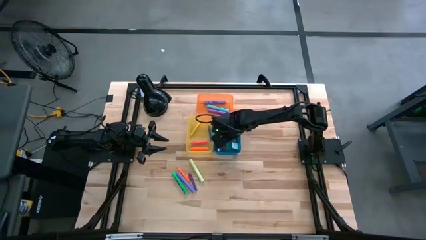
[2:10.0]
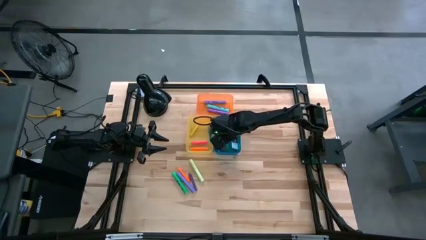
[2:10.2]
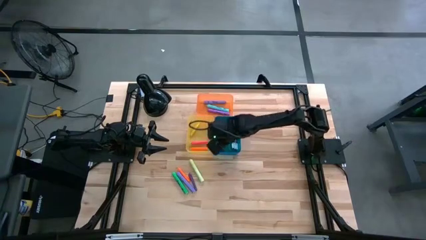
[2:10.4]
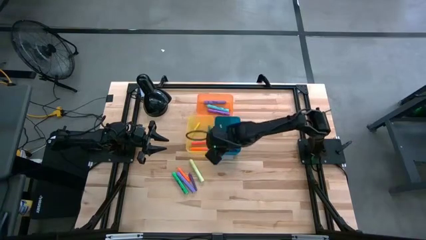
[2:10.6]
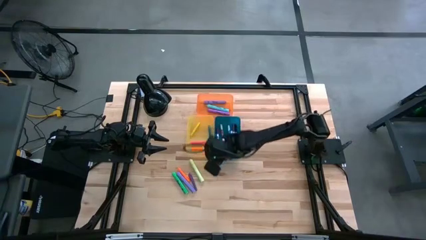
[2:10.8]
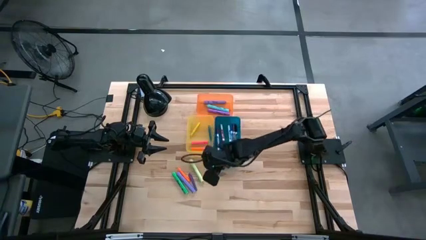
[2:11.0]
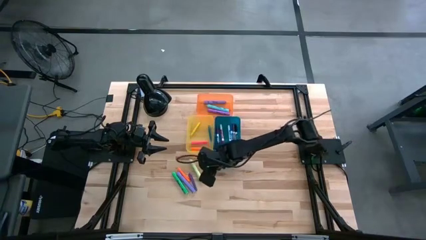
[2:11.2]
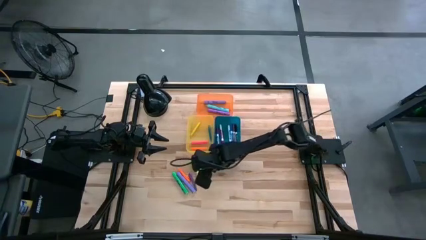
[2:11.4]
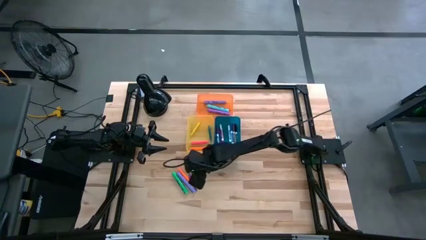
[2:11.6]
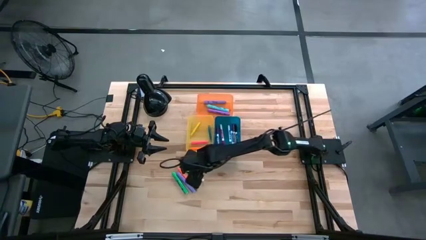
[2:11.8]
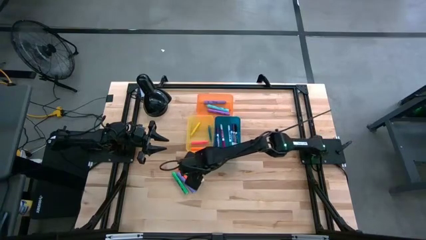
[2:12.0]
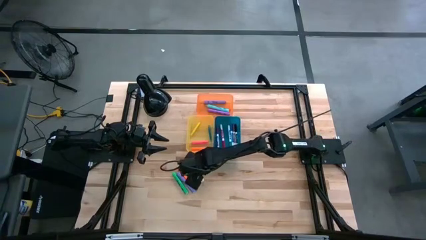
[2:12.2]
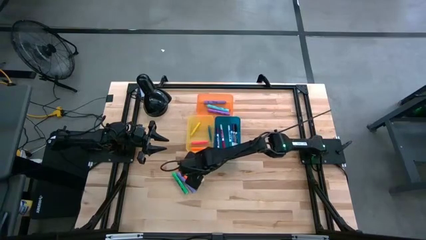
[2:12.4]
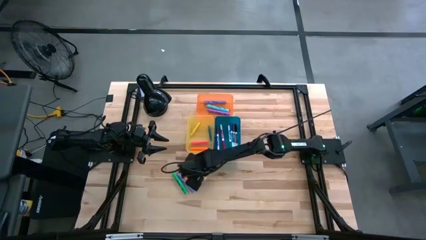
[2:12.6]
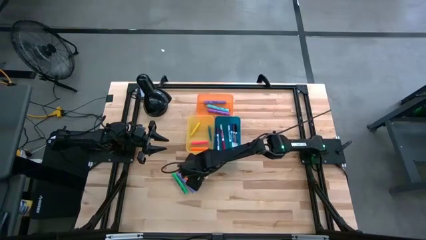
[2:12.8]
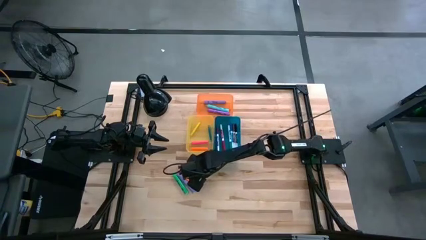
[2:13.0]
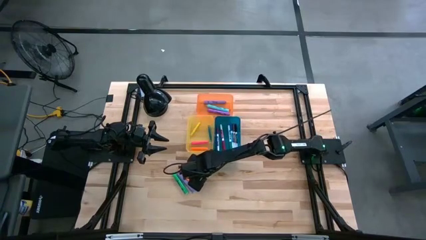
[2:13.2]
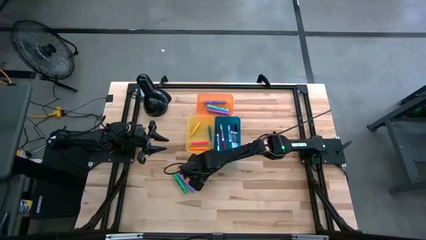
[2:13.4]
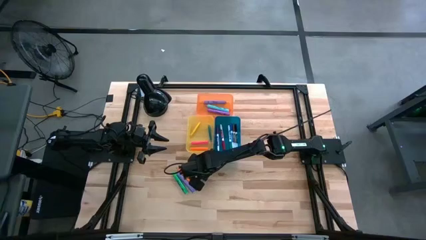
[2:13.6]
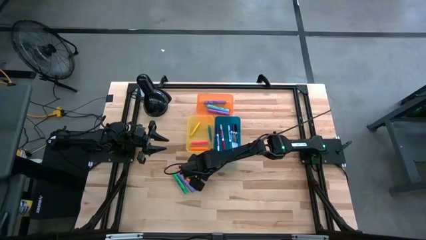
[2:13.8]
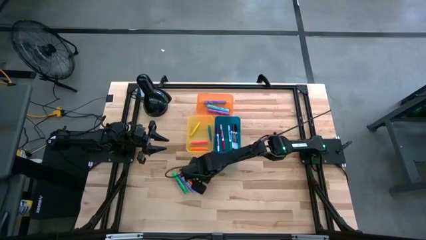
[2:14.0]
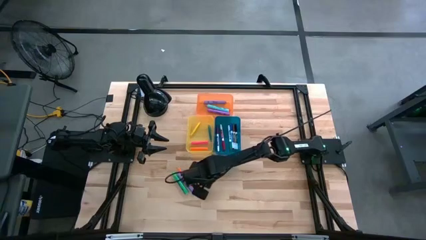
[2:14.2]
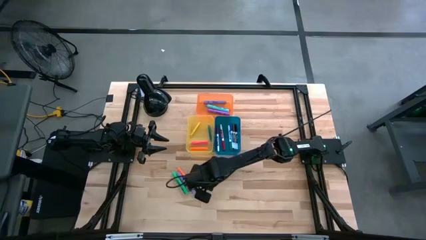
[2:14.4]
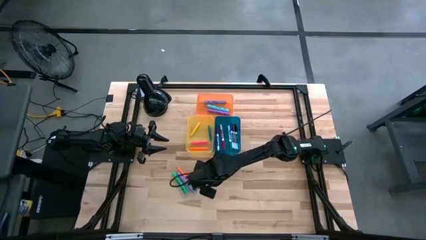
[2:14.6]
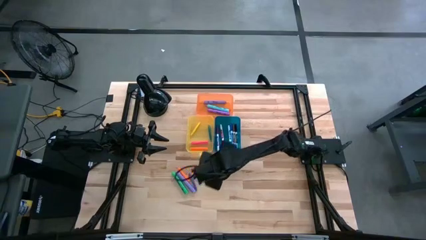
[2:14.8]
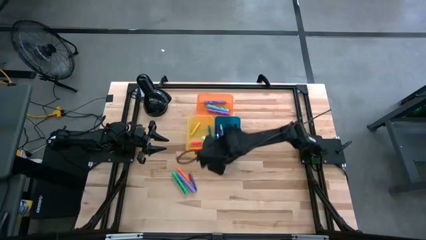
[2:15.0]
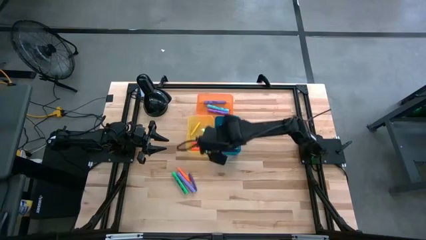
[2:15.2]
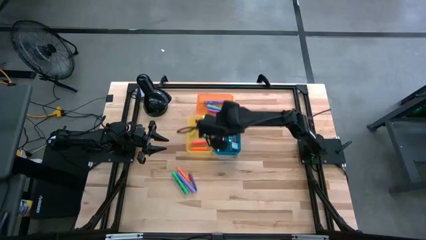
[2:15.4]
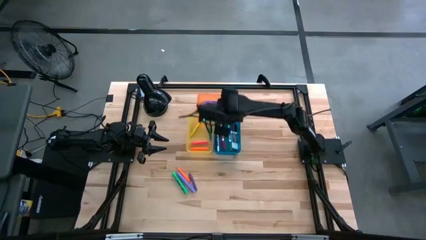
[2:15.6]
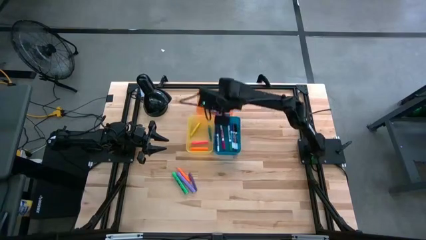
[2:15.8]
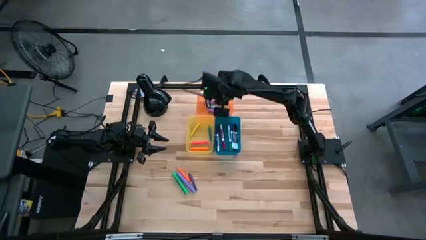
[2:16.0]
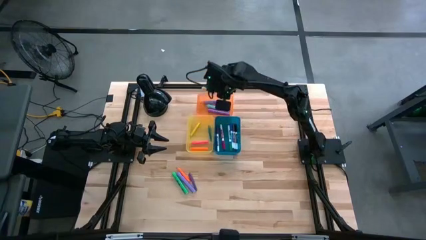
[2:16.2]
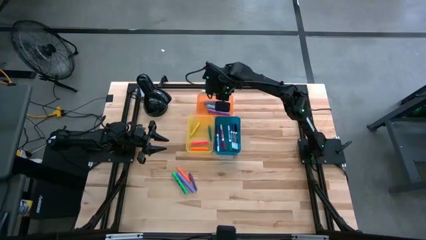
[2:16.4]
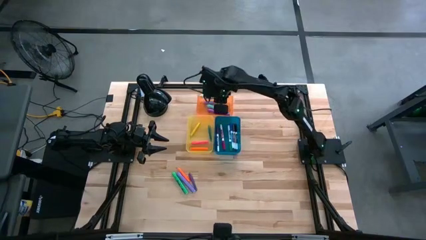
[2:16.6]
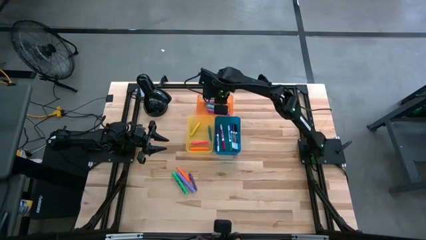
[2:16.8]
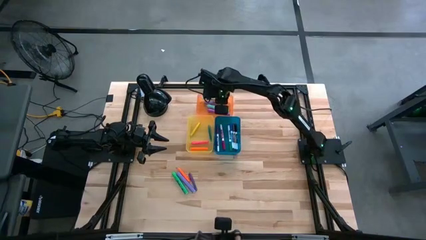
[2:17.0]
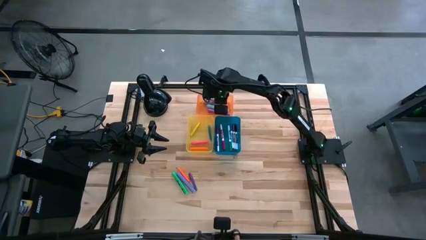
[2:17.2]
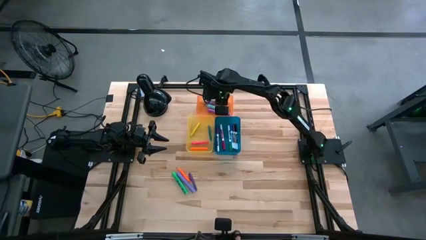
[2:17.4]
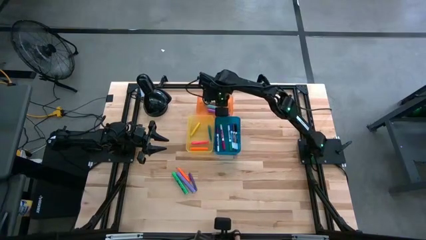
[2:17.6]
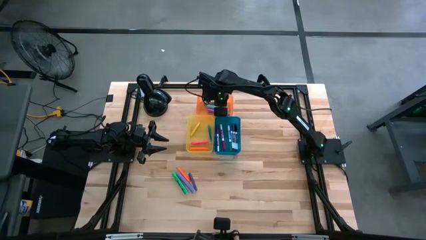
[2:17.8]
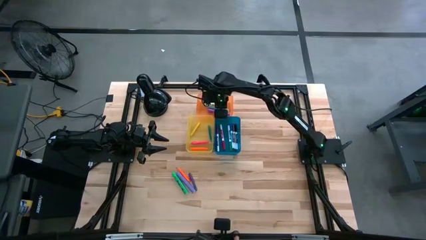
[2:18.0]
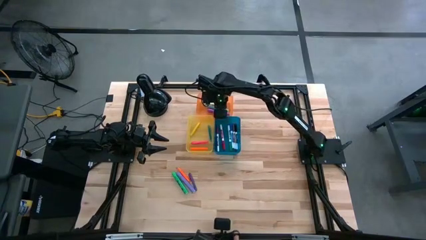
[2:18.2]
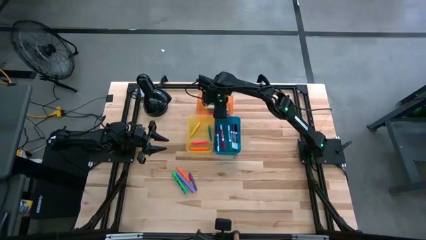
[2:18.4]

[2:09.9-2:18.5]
Task: Pick & Place Markers
Put the yellow highlighter pen into the orange bin

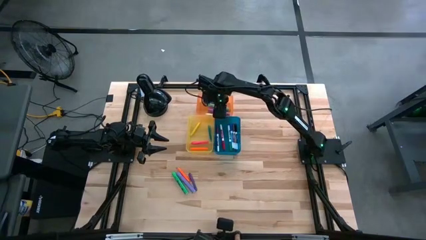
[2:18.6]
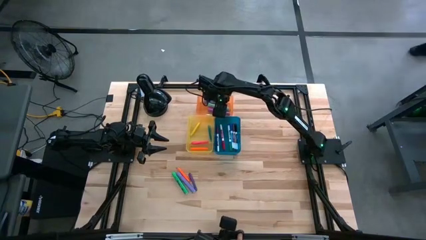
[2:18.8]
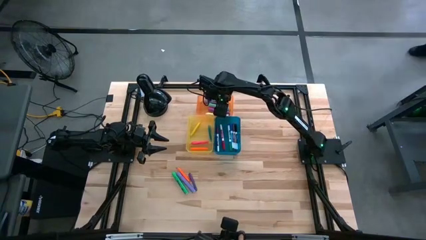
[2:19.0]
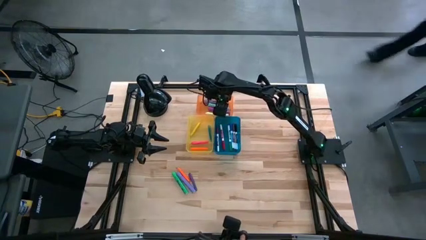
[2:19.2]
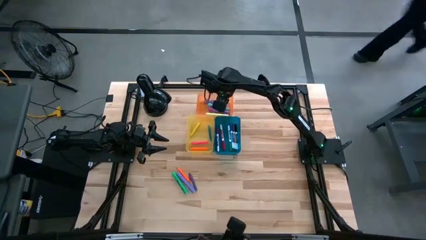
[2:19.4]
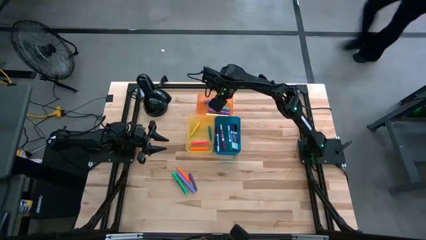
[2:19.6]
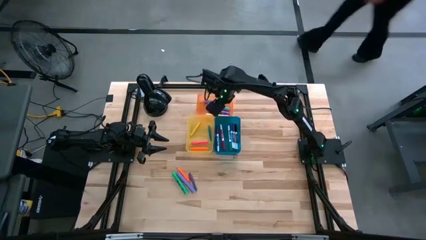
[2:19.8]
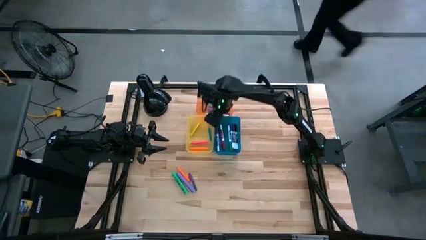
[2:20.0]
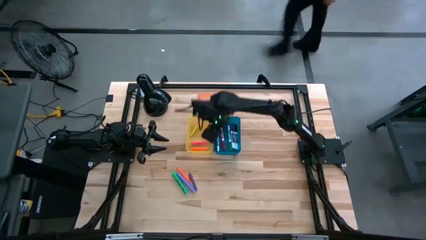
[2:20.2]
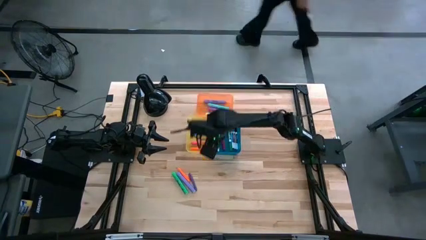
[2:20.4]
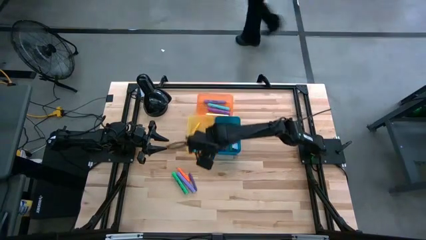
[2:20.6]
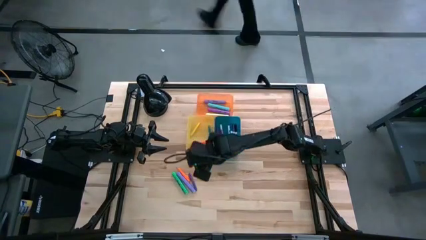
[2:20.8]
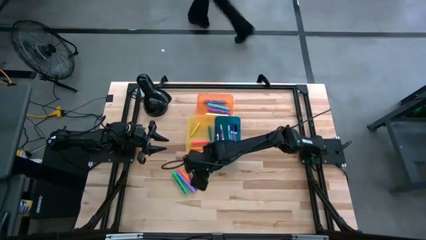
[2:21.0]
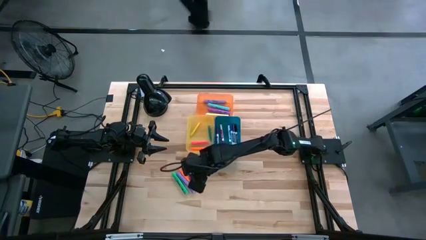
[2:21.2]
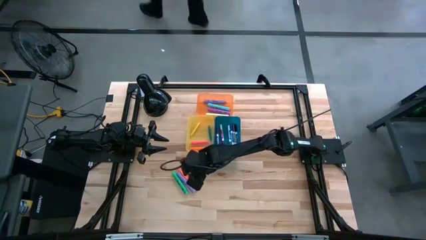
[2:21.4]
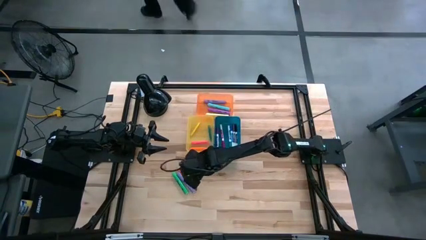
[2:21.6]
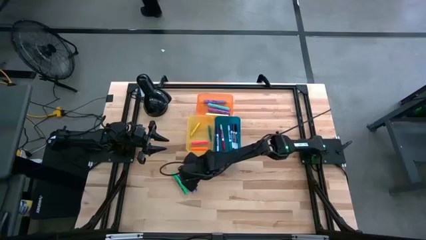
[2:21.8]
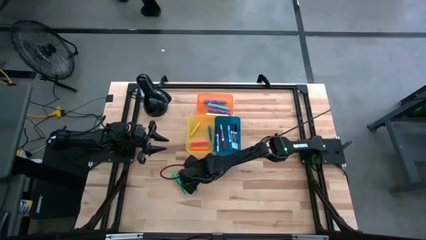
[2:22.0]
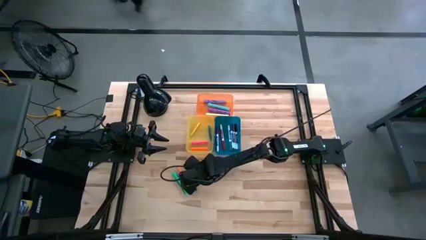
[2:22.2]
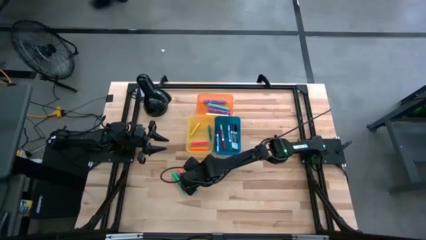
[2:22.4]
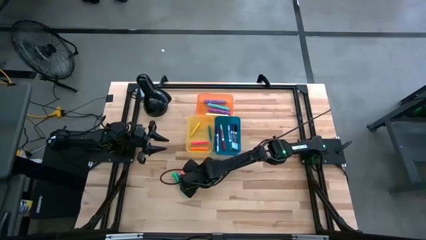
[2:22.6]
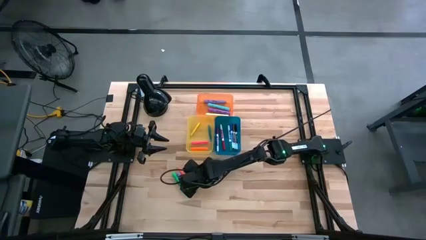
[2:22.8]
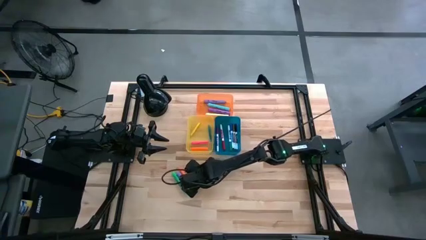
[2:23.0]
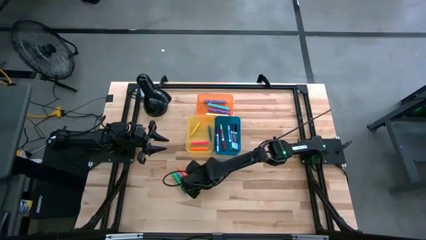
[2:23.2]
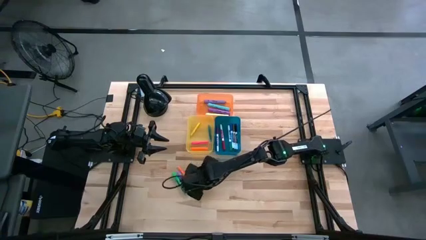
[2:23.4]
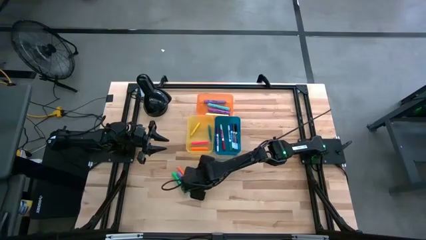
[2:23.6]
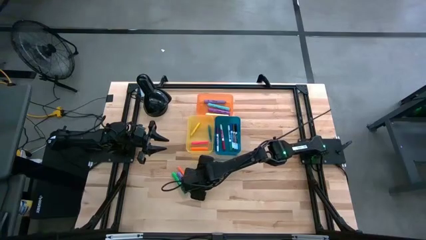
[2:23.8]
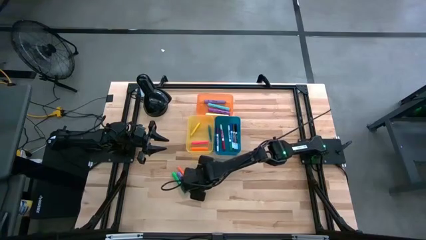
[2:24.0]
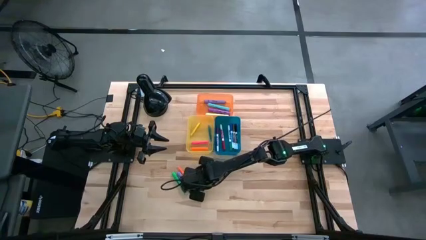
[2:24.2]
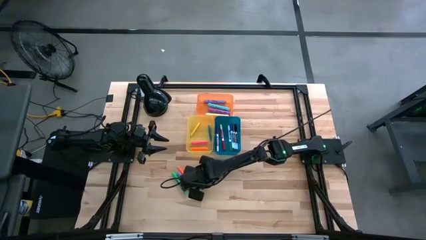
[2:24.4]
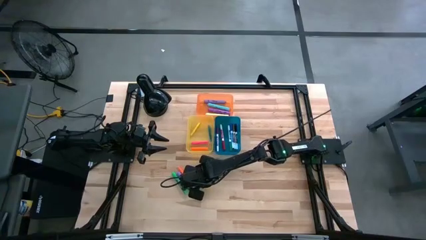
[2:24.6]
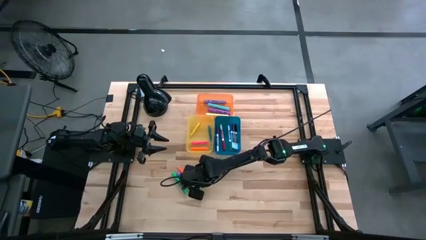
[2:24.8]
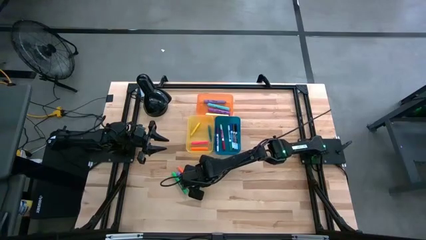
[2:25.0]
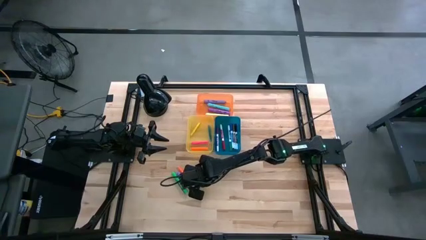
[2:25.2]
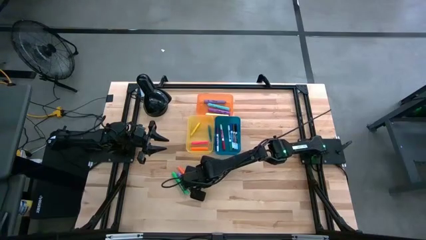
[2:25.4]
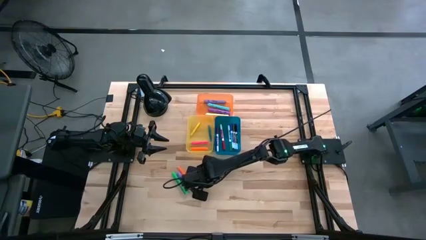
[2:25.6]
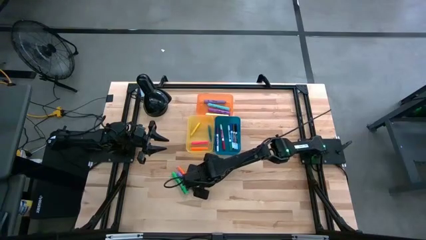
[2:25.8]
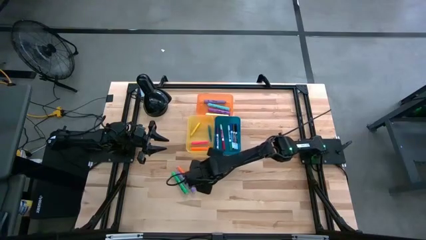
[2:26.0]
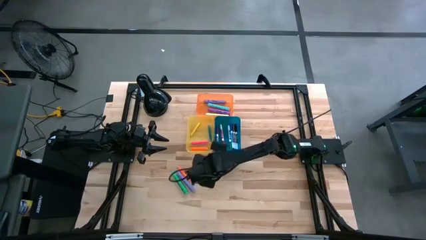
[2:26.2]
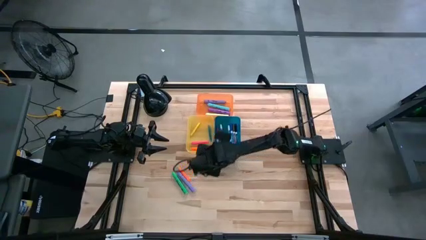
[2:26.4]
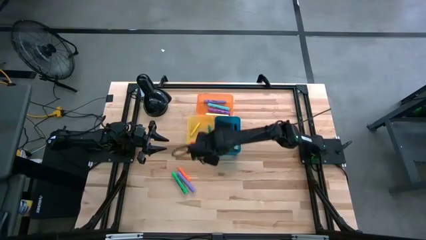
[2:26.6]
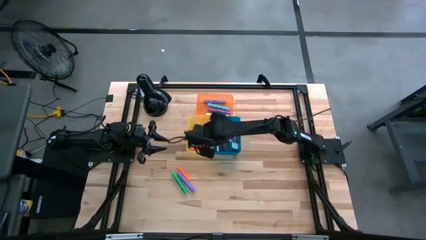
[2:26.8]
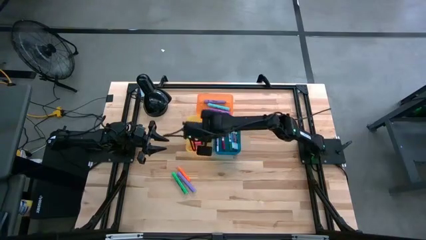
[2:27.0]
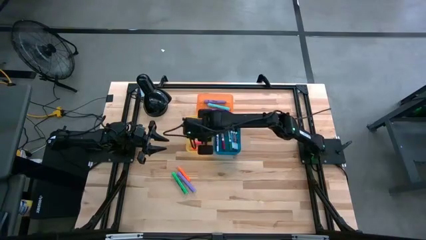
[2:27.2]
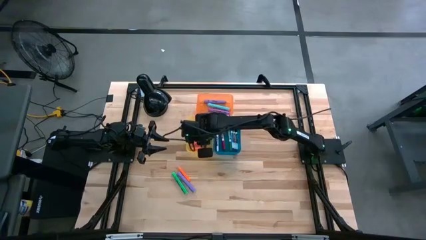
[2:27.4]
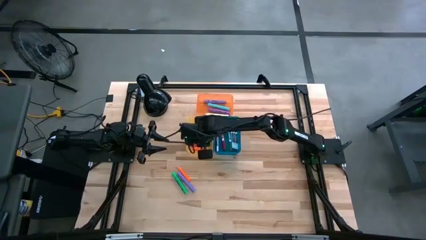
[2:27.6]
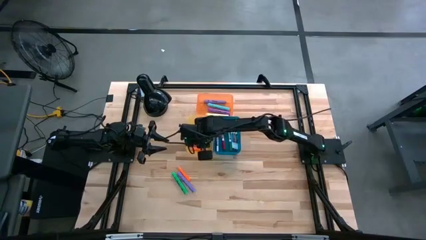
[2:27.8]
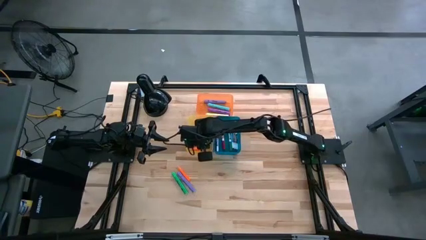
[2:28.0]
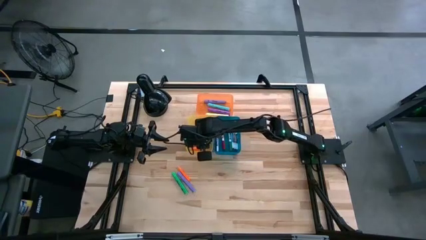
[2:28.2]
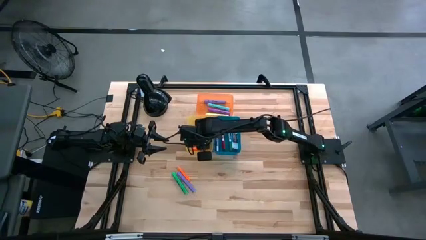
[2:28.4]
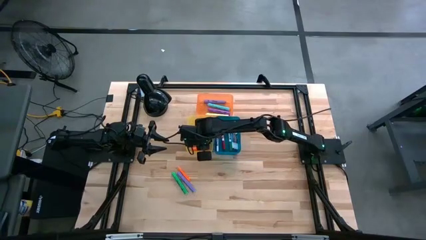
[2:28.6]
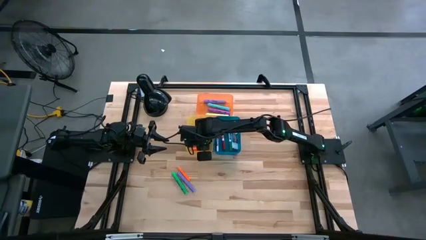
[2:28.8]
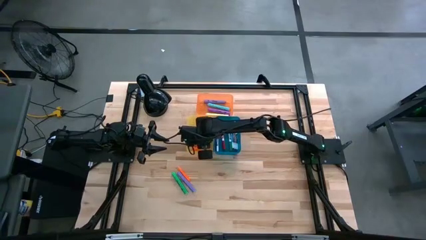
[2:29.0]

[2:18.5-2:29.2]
Put the purple pen into the yellow bin
